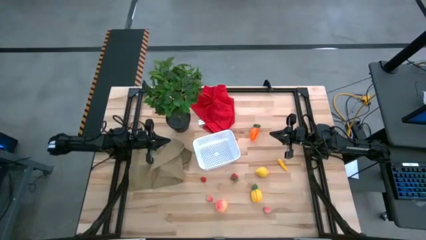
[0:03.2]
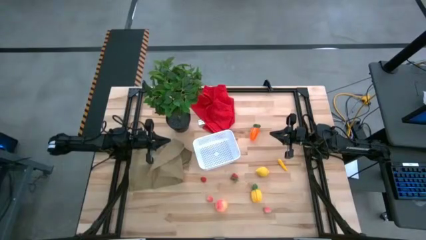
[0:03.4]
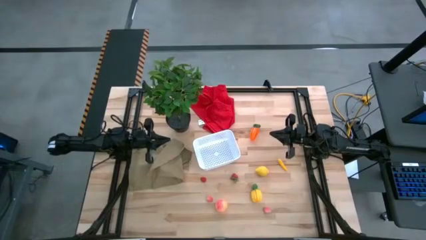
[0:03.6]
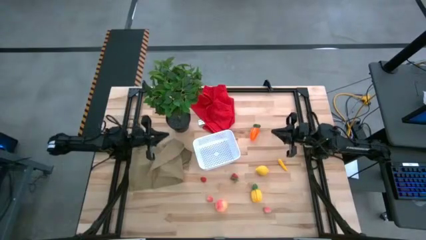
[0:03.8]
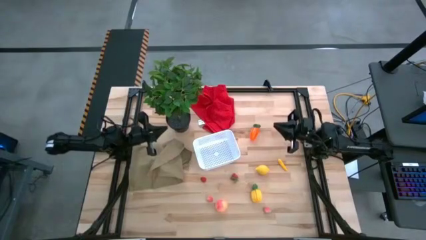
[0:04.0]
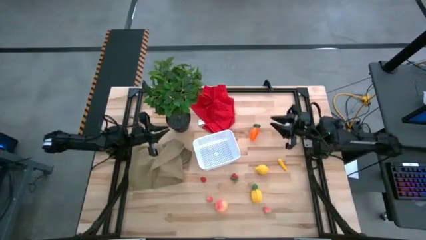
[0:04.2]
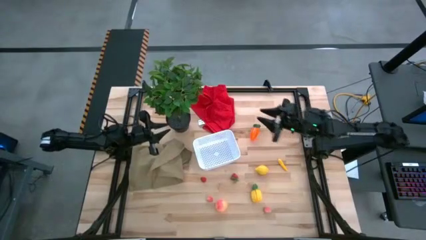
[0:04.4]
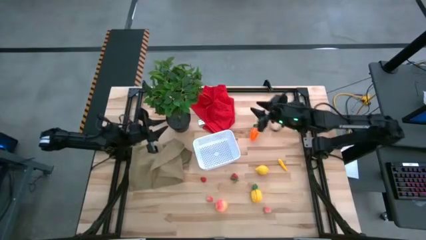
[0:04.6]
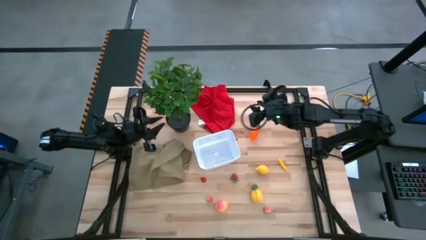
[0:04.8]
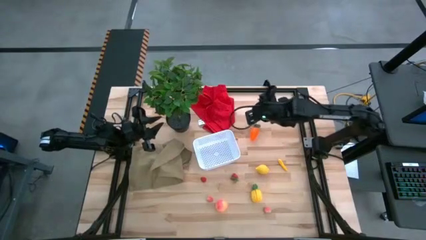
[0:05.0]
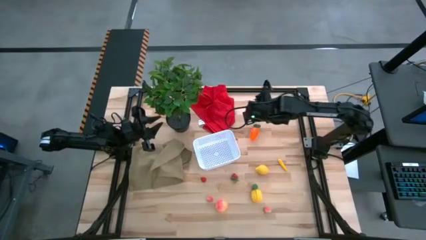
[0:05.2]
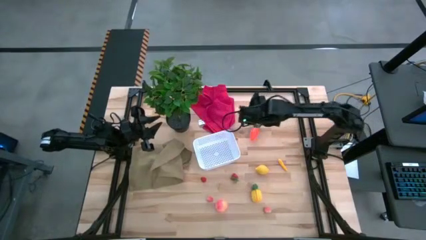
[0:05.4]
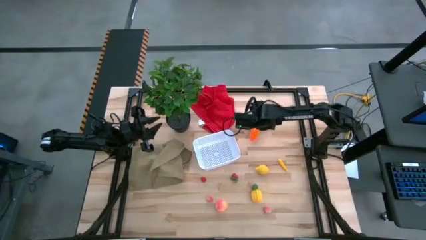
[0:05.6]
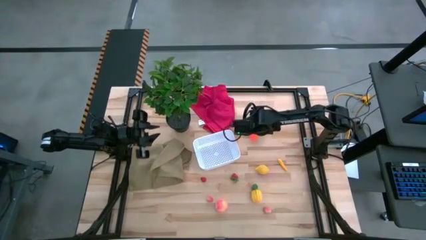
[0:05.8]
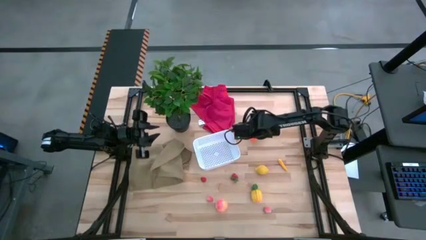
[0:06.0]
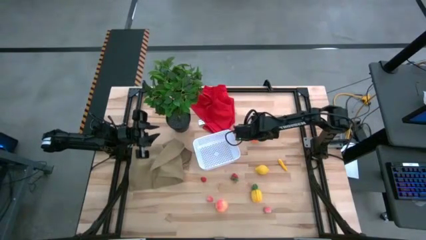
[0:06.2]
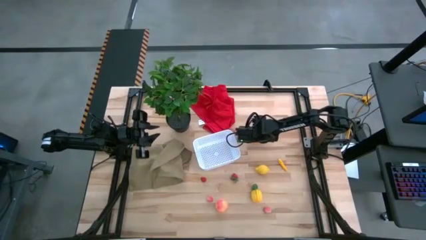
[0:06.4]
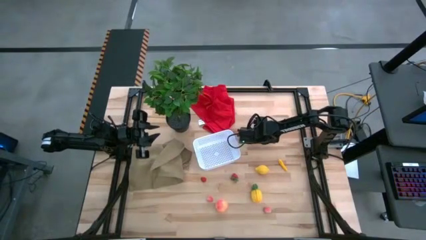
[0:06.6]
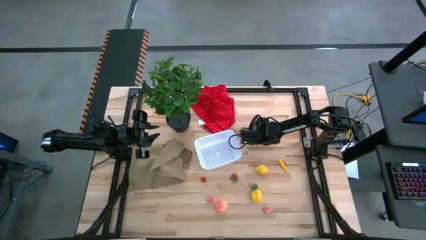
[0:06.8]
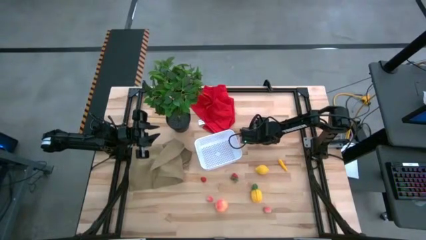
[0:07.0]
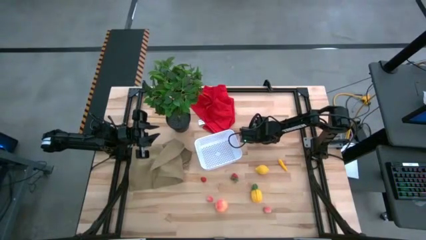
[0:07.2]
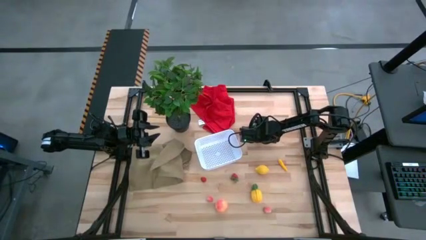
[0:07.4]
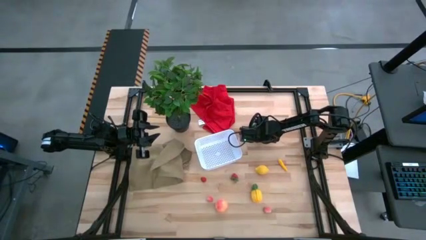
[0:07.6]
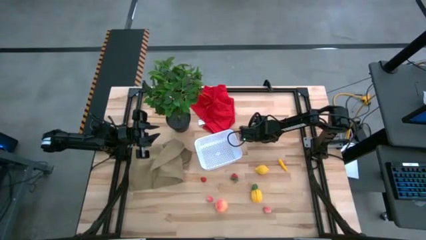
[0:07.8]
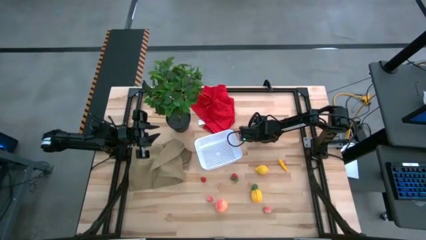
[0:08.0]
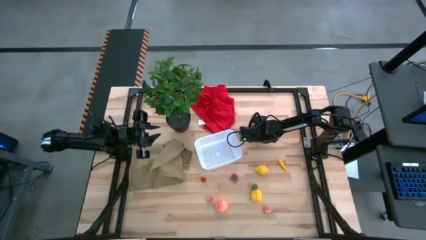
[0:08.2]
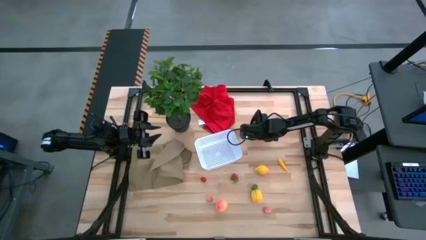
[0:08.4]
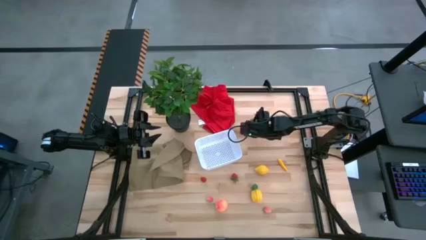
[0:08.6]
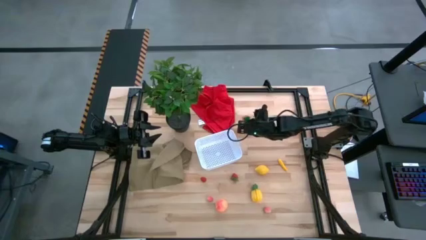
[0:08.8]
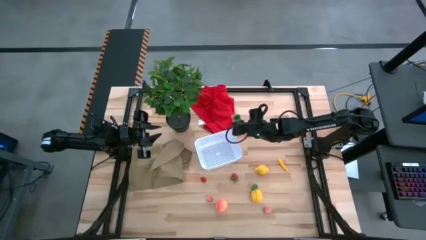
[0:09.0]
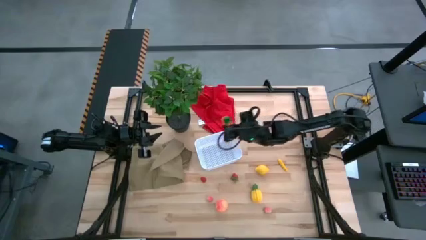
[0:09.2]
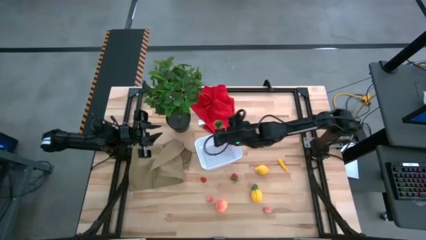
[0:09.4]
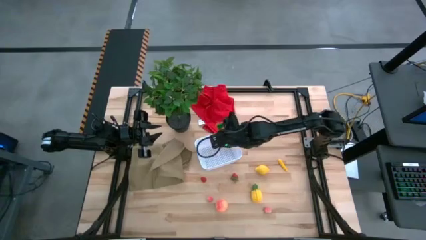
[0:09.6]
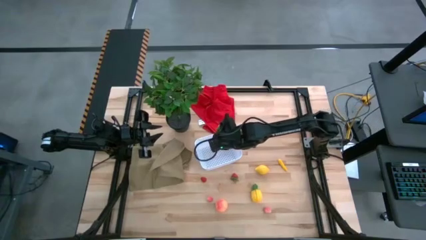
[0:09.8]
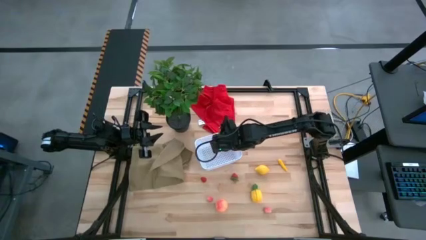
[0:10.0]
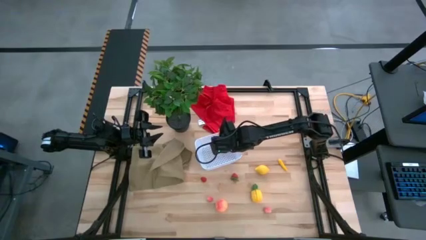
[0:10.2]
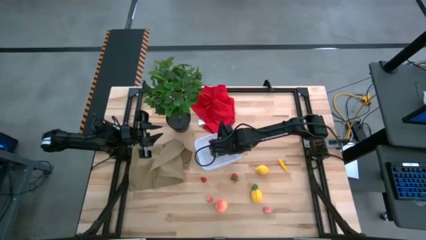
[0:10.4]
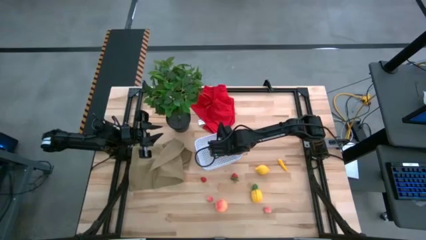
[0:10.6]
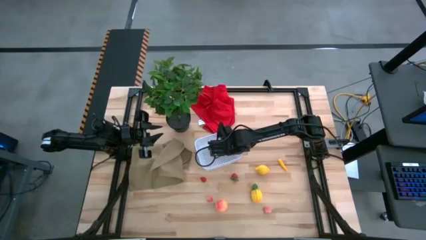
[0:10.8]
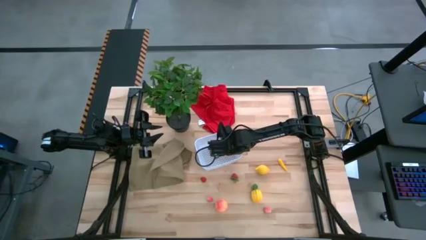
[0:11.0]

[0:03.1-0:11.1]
Task: Pick and placing Produce into tupperware
Put the orange carrot into the bin

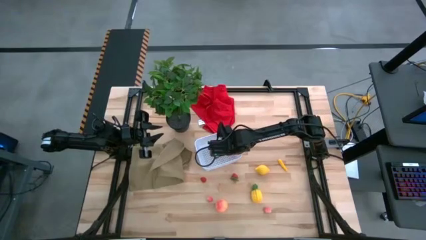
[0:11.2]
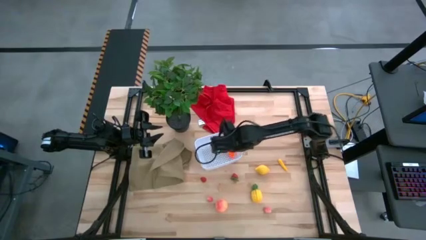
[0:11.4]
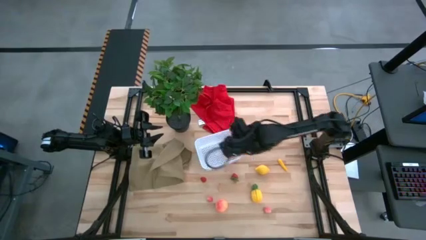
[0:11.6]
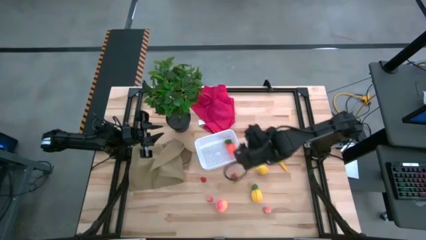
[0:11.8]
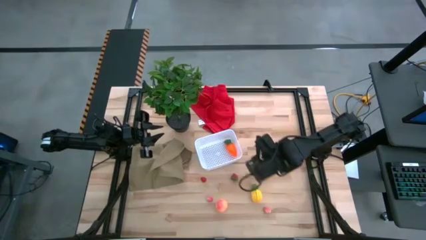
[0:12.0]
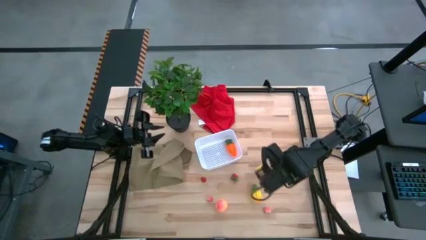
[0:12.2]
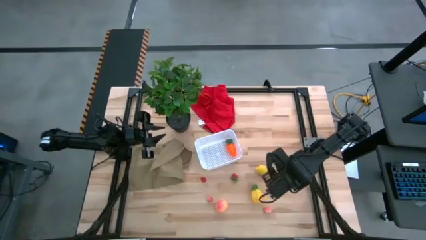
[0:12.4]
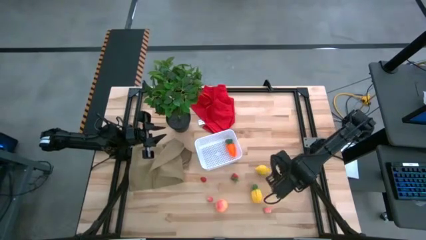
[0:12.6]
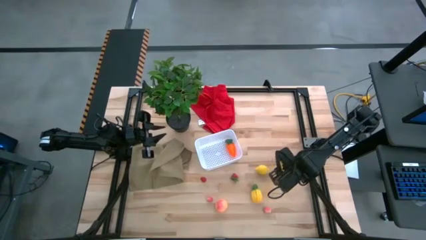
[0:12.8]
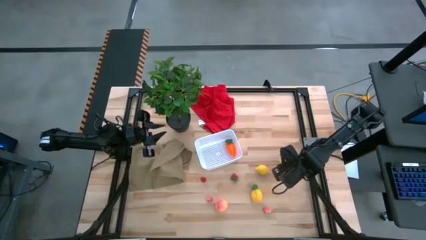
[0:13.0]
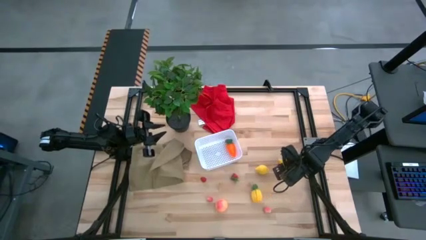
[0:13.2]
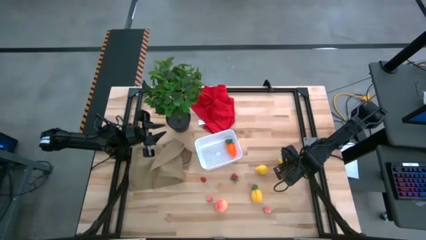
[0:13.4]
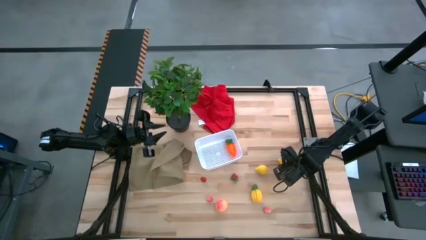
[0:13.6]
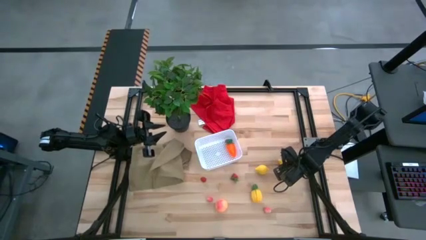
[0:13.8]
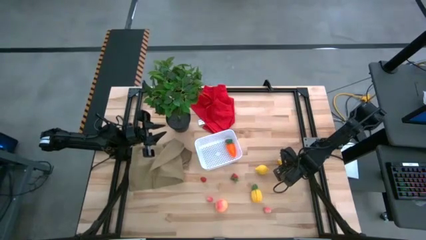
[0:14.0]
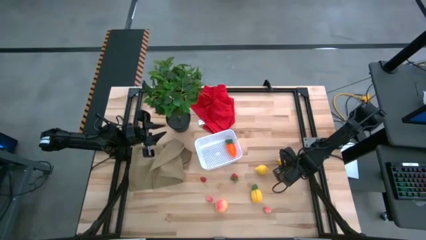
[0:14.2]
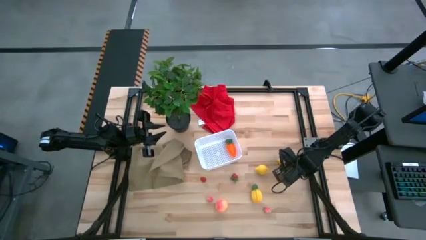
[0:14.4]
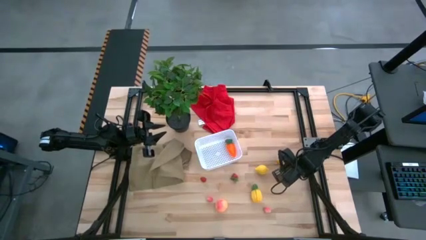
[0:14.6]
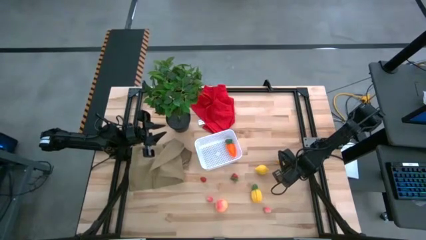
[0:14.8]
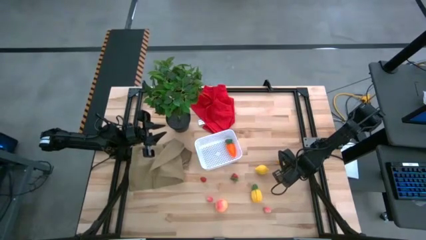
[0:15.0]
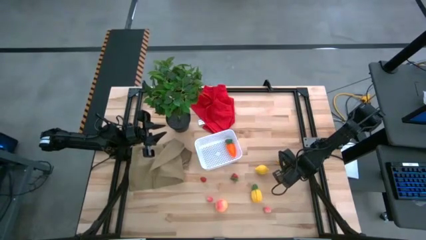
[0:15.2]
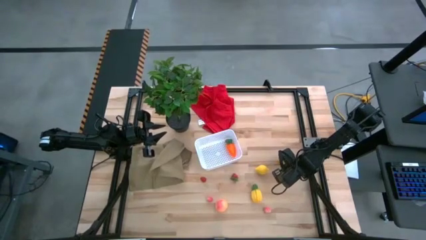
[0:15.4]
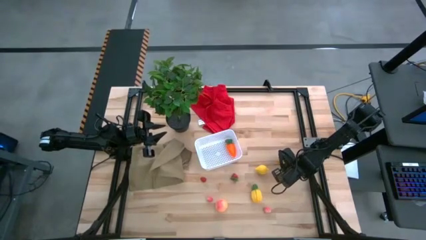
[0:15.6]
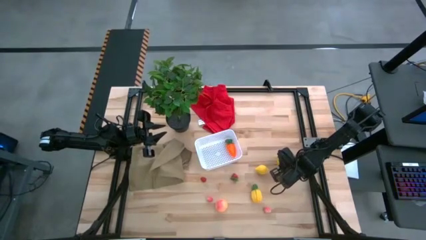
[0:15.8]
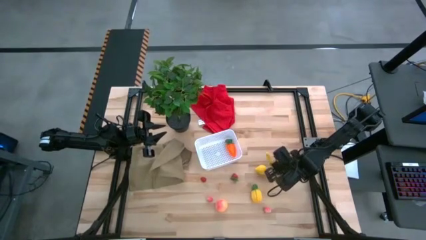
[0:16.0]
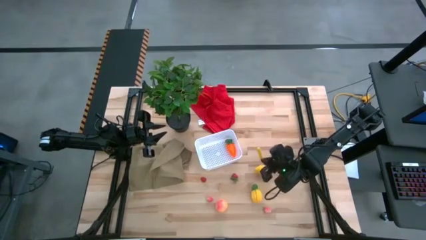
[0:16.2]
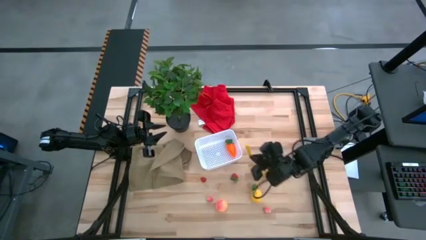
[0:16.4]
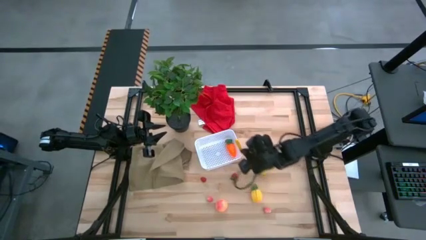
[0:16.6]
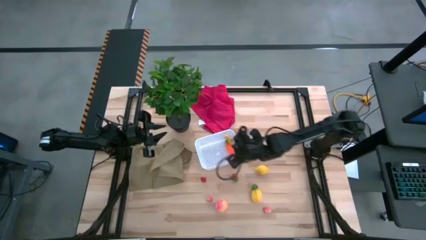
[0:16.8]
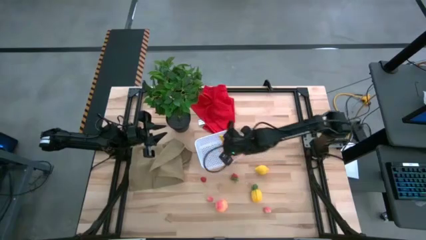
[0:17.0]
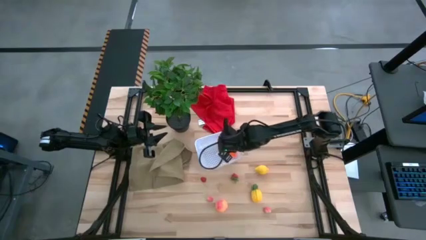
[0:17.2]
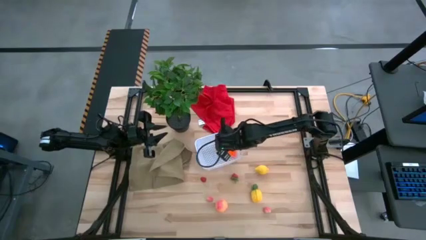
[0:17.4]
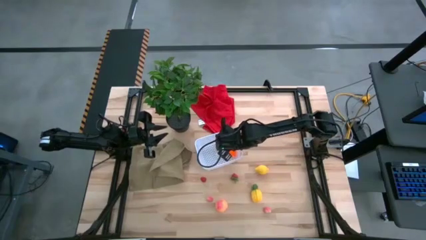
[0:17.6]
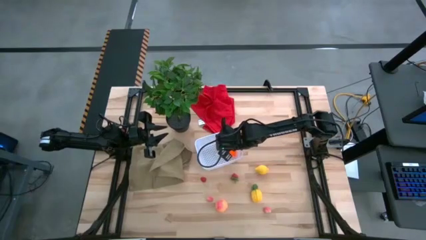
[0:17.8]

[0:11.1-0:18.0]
Put the yellow banana pepper into the bin
